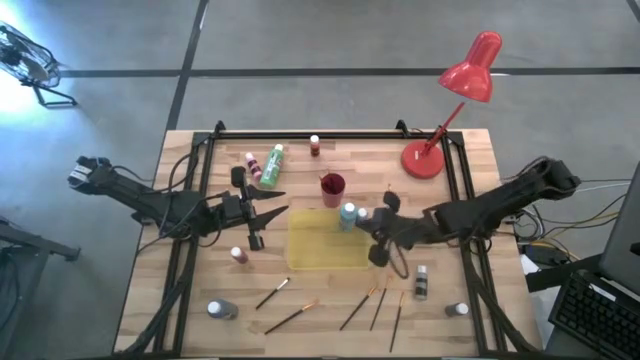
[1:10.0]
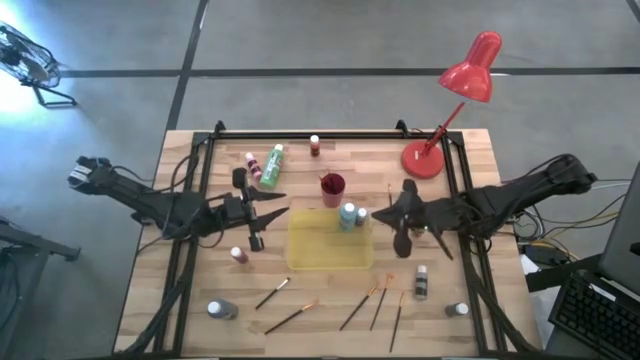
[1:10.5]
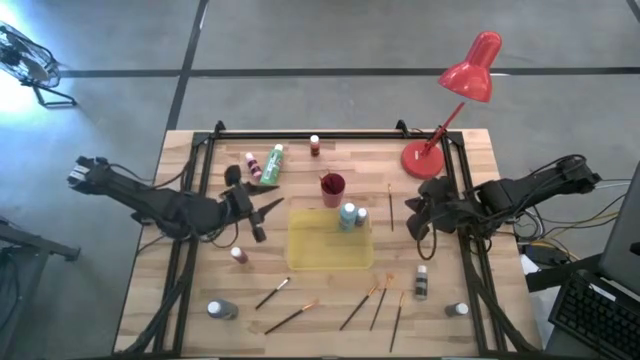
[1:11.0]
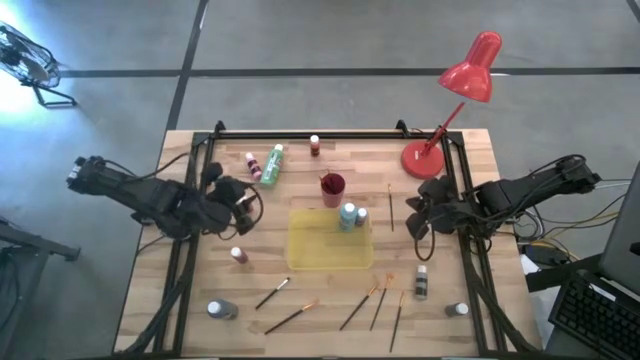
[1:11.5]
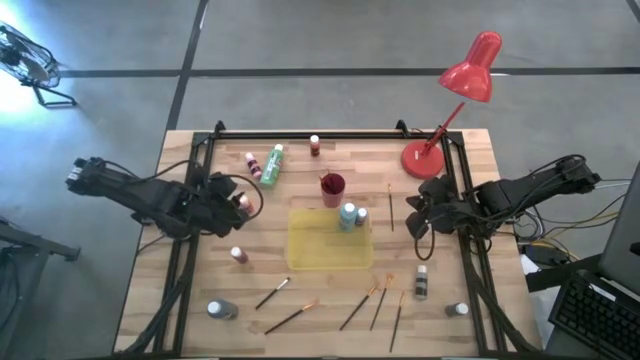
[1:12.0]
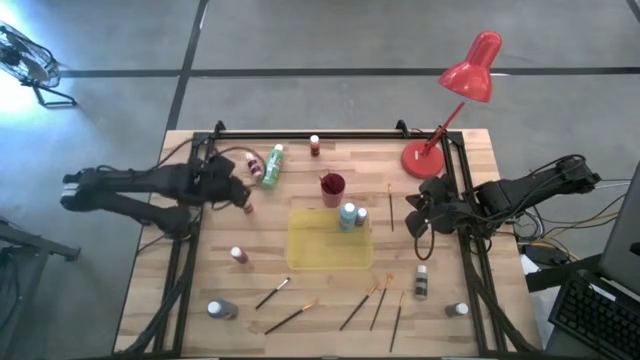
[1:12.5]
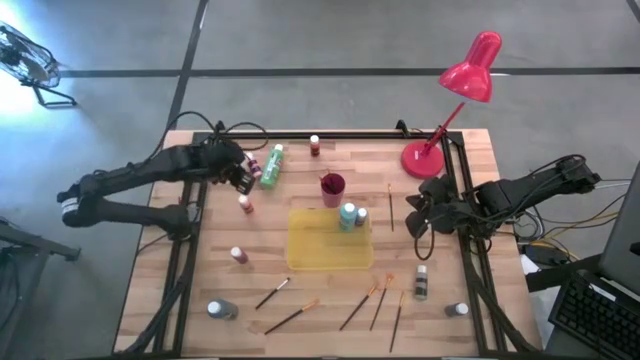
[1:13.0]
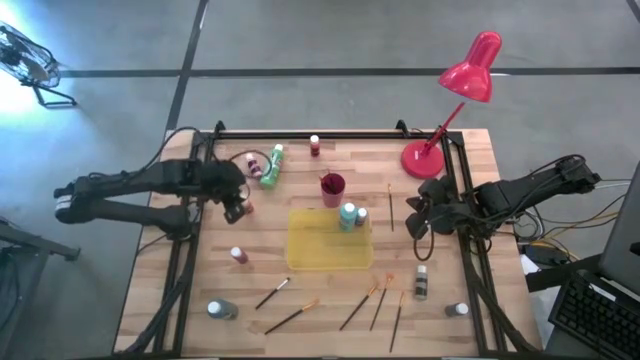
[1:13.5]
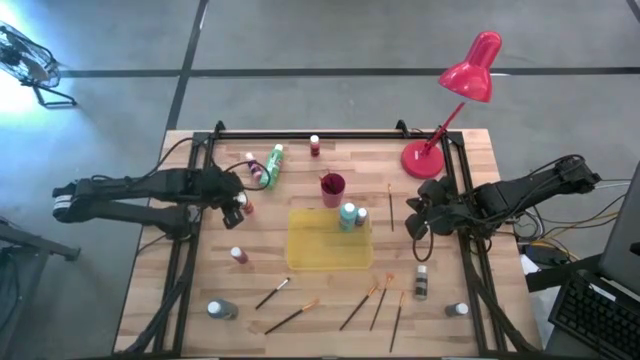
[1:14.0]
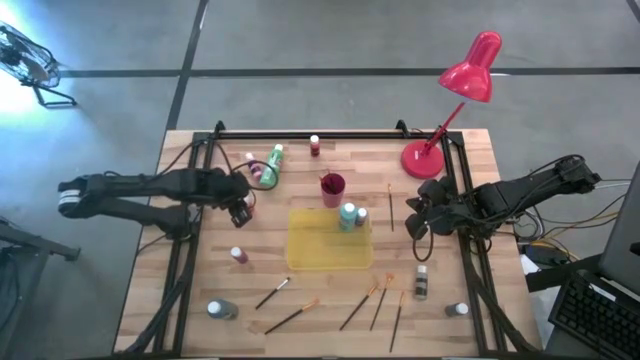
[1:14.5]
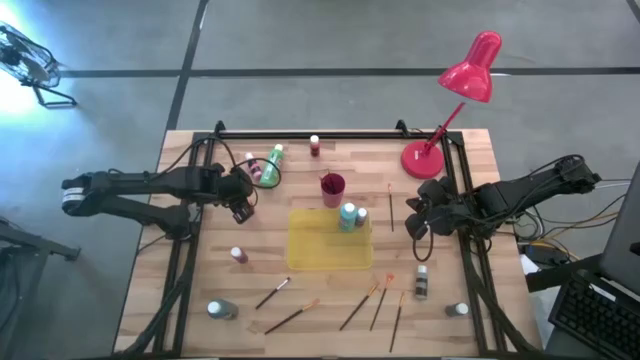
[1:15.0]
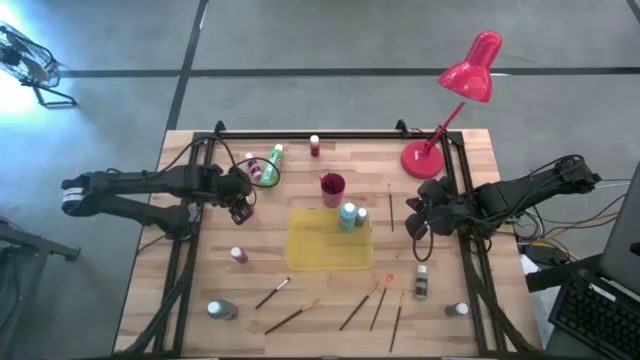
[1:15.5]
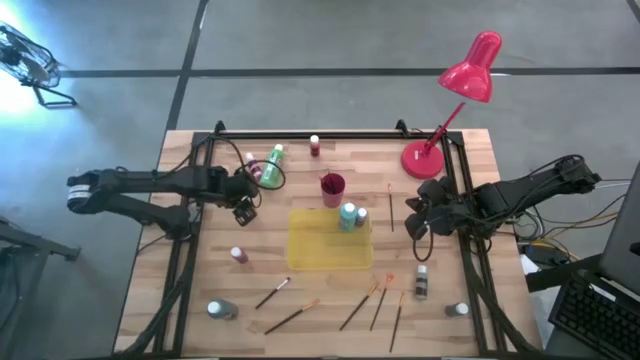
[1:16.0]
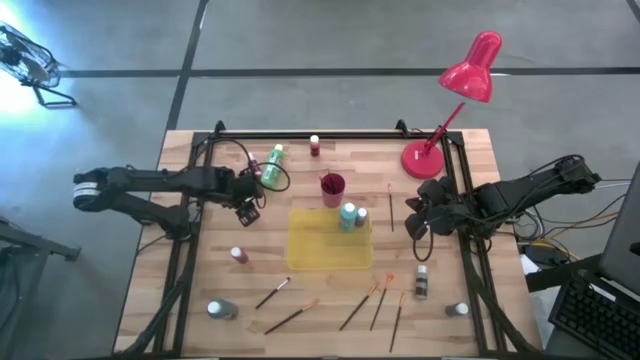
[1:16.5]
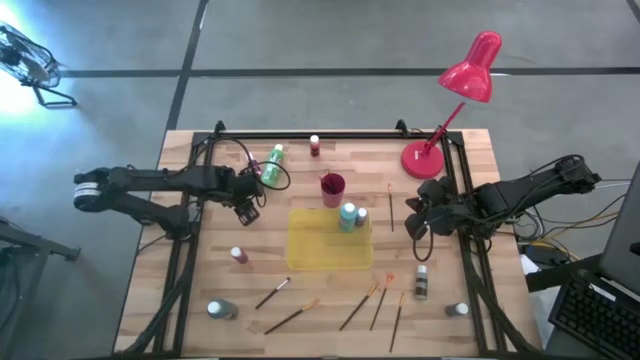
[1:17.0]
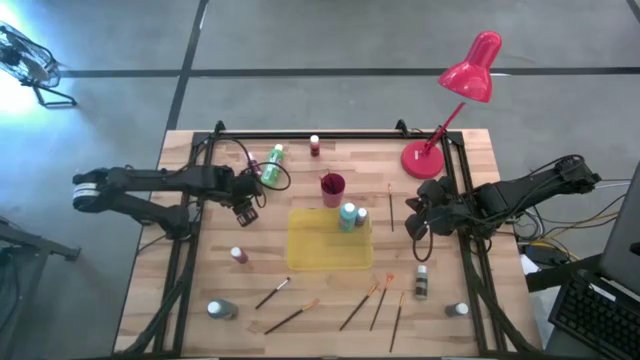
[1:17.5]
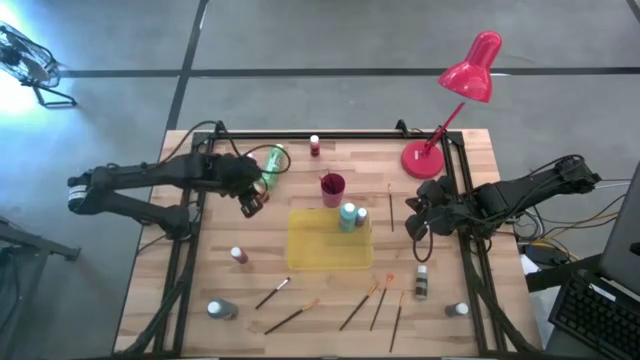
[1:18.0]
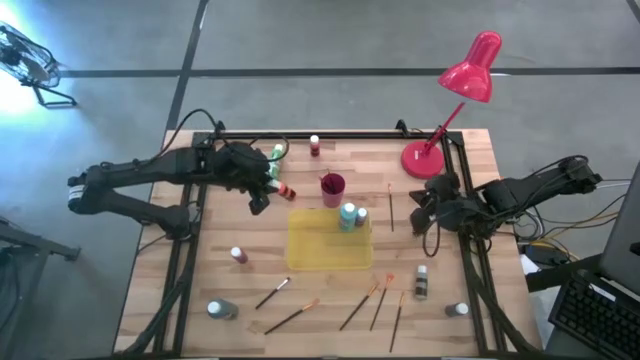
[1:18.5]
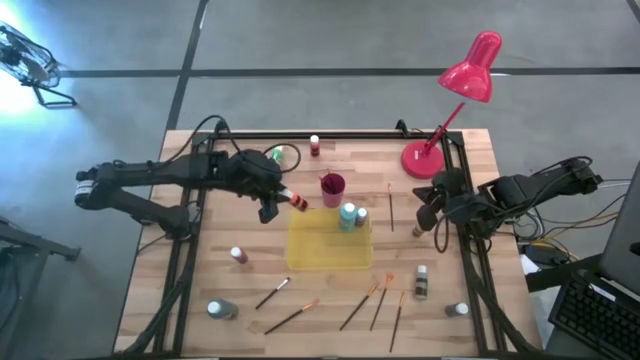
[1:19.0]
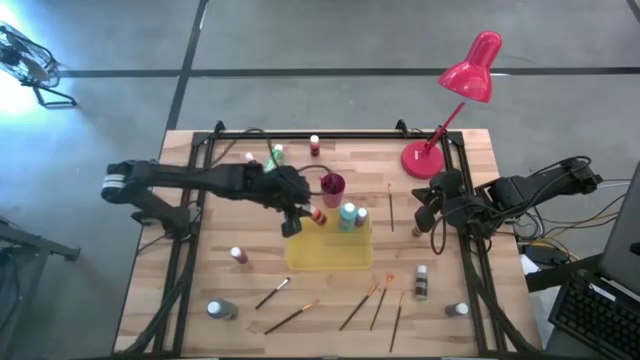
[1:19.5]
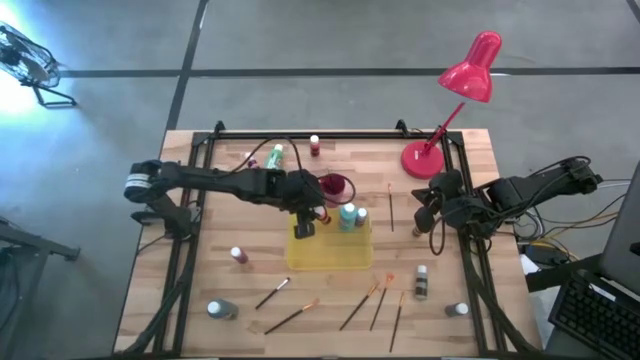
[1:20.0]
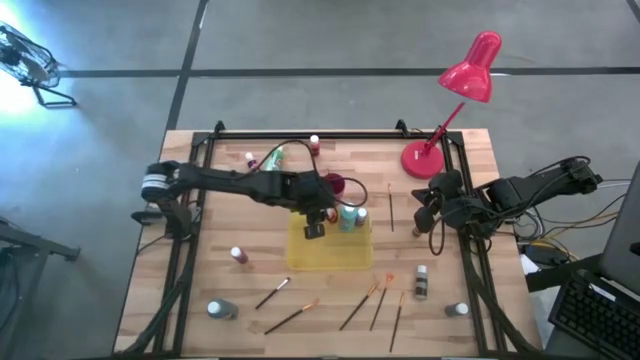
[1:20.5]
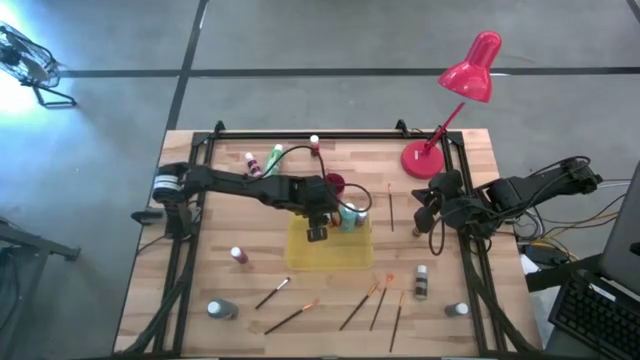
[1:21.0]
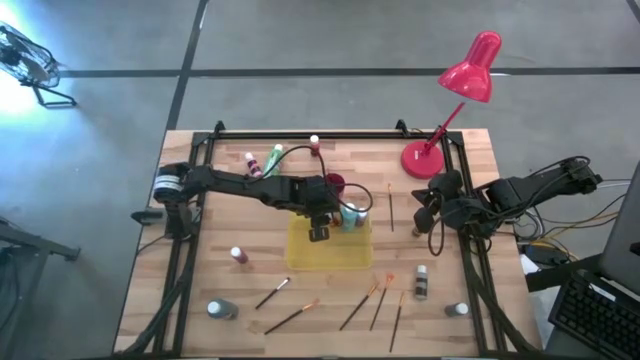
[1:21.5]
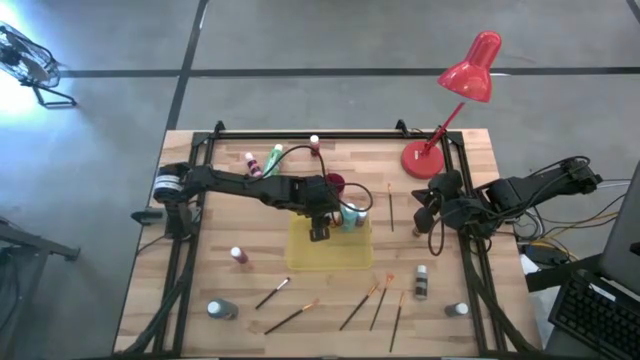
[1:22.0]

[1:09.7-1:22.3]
Task: Pick & Place Paint Supplies
Put the small orange paint bottle into the yellow bin

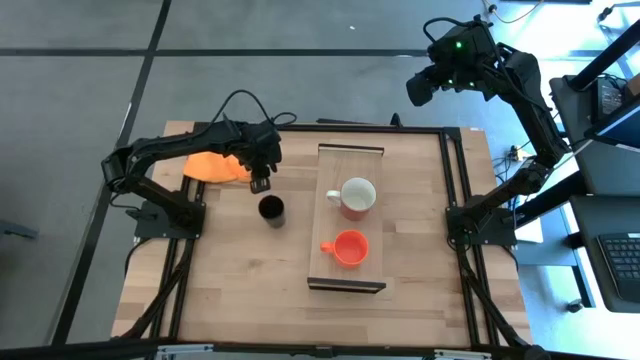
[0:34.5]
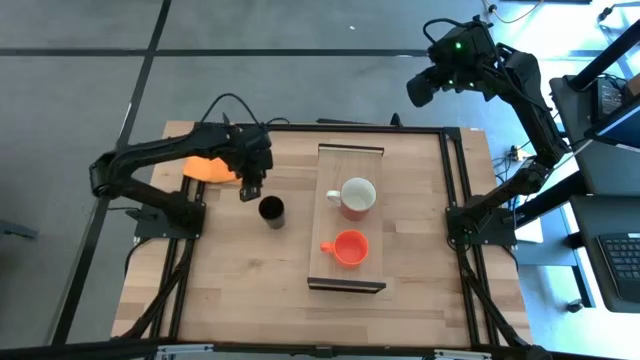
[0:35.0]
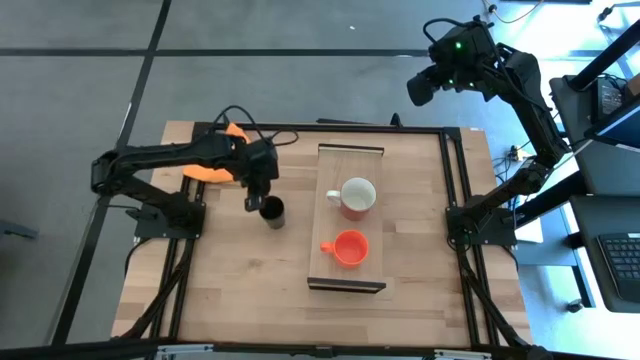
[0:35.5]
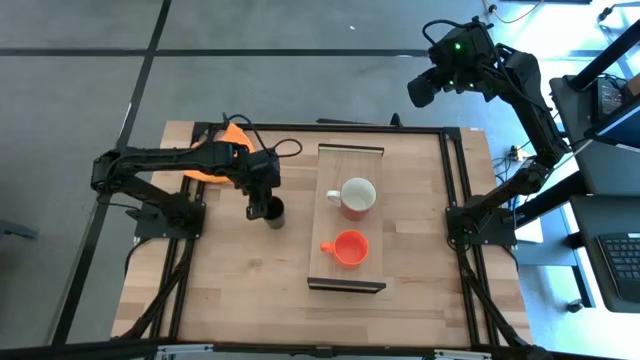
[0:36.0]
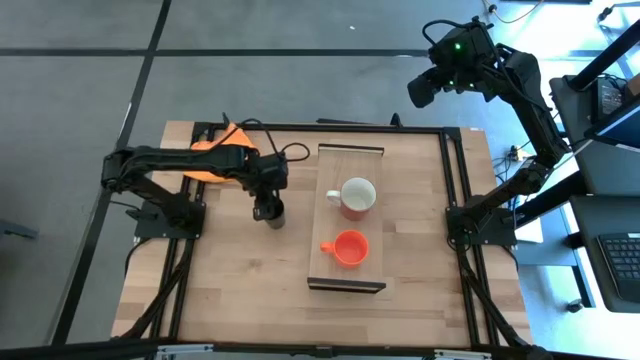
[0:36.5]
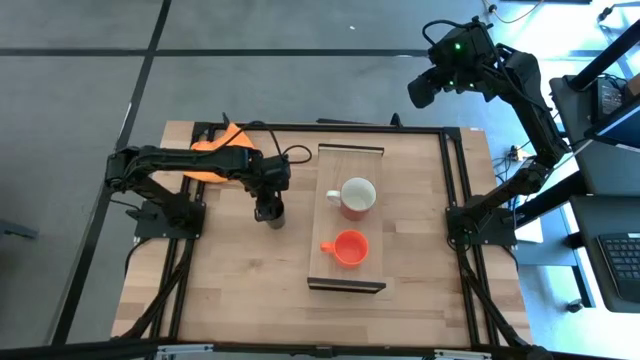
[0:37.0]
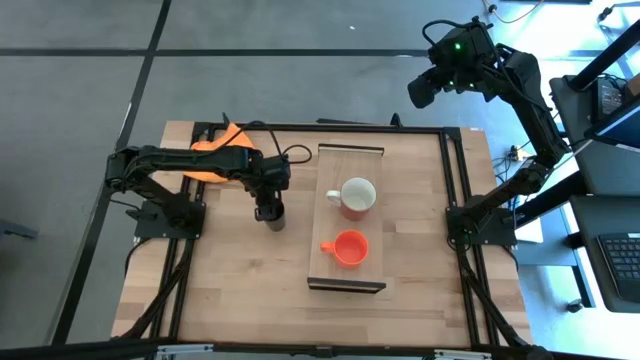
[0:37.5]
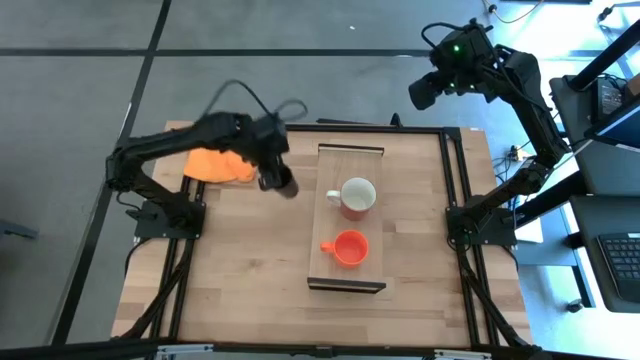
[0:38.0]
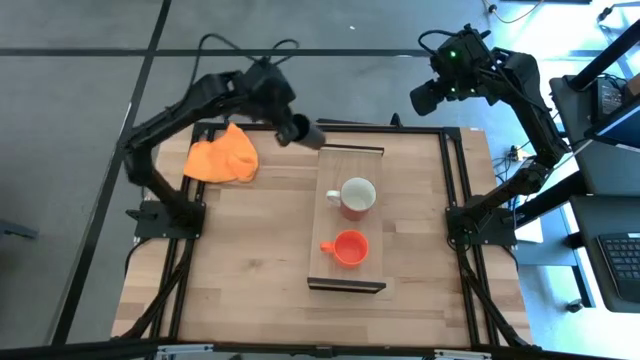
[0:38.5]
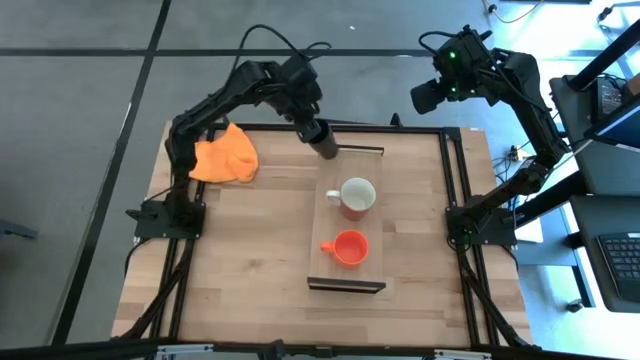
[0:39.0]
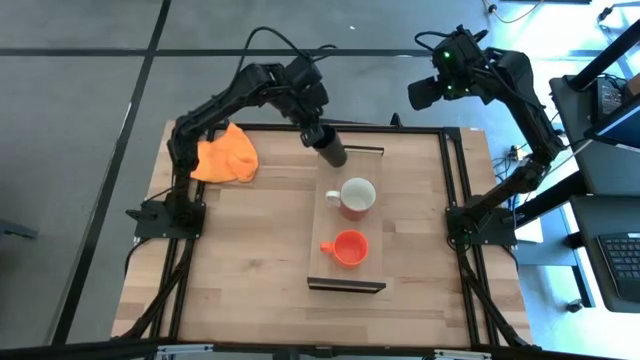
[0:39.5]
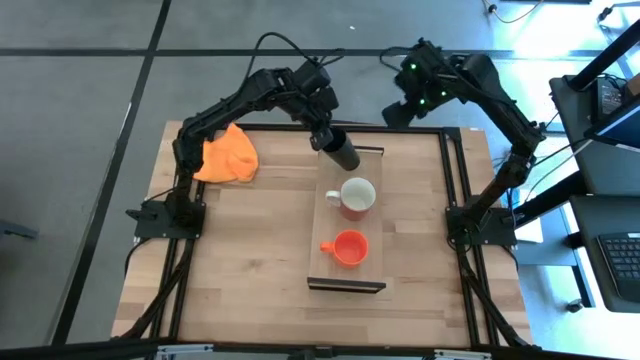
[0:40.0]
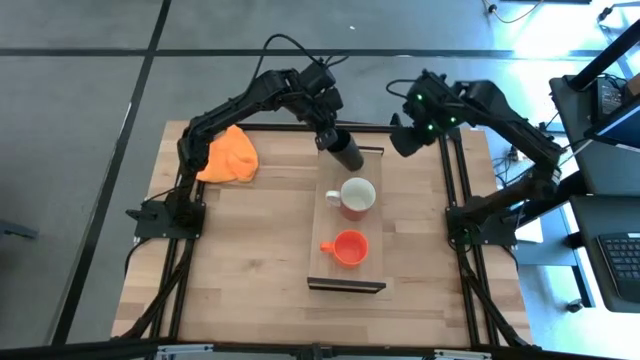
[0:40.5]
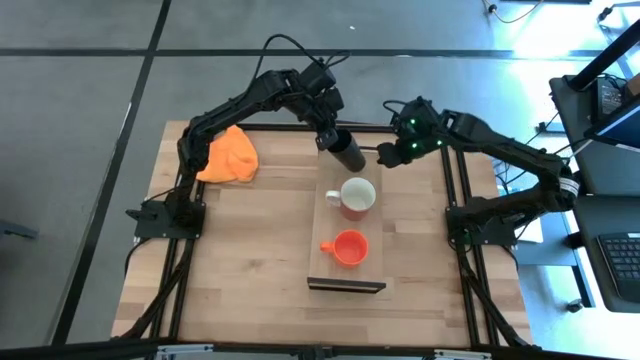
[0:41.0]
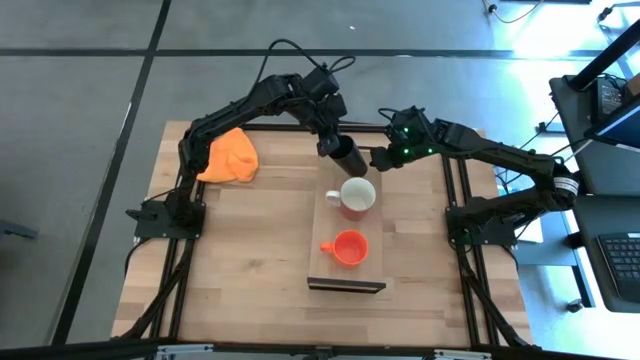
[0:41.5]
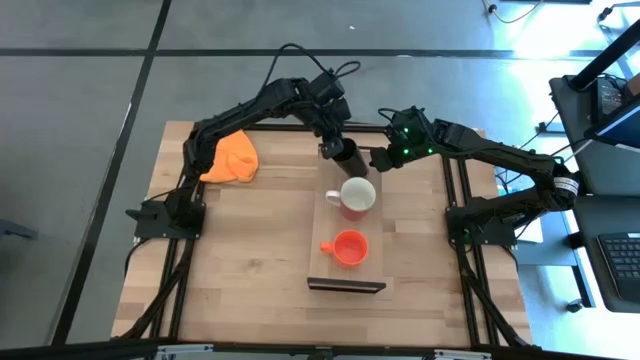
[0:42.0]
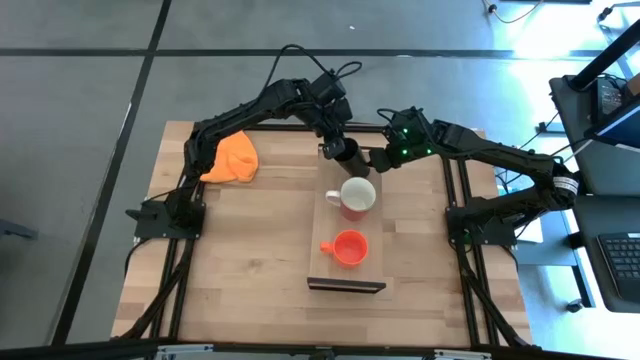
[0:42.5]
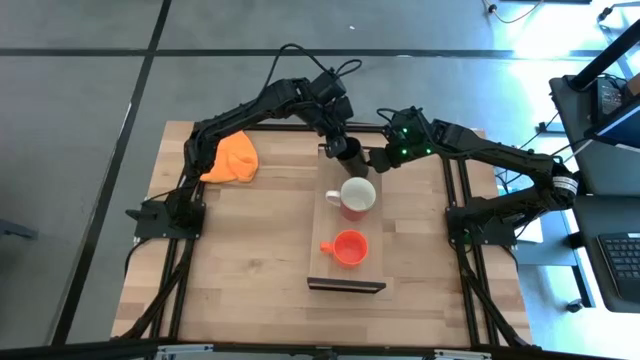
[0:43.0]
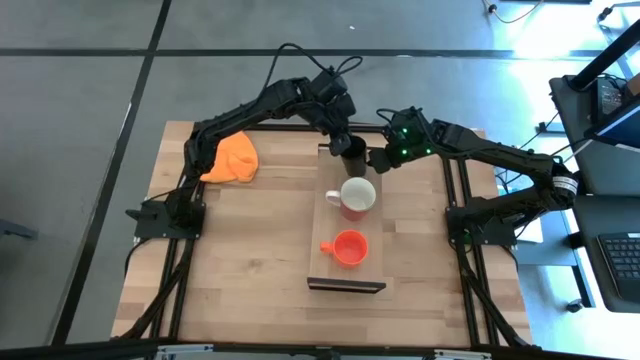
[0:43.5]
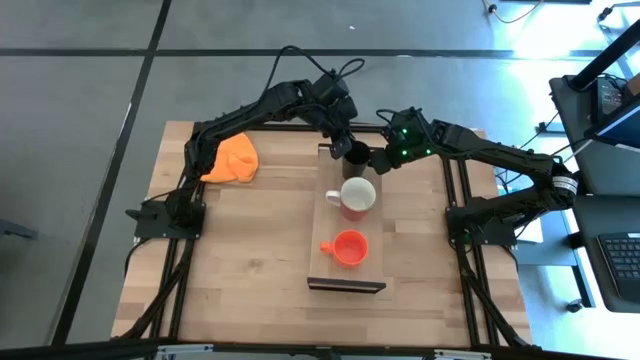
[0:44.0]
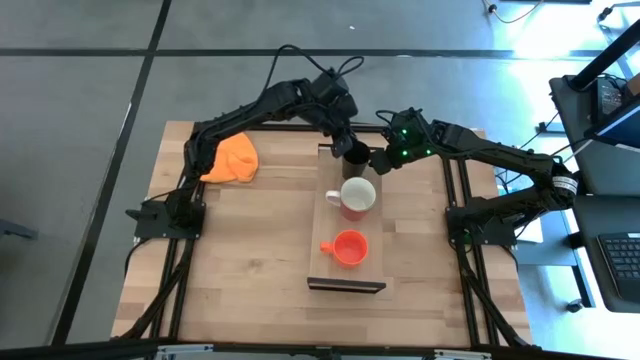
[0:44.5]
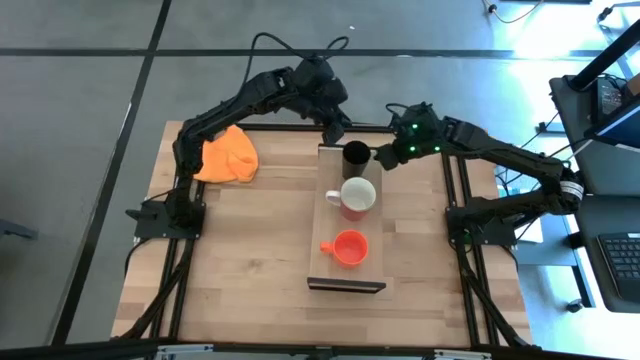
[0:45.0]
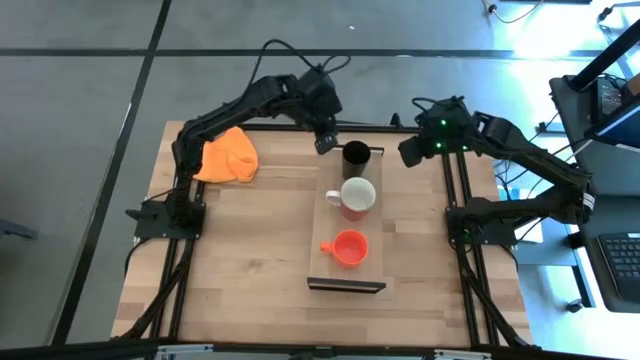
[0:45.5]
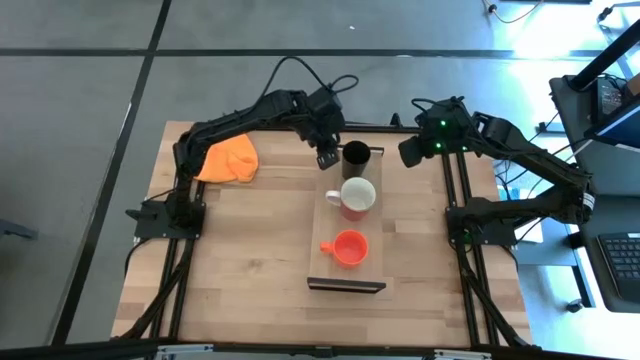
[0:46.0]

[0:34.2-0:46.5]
Task: Stack small to large cups/mugs on shelf
Put the black cup on the shelf
